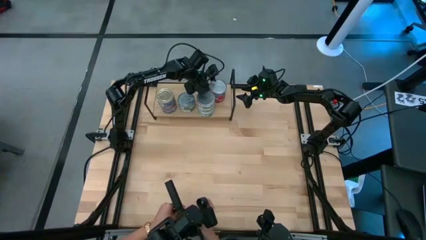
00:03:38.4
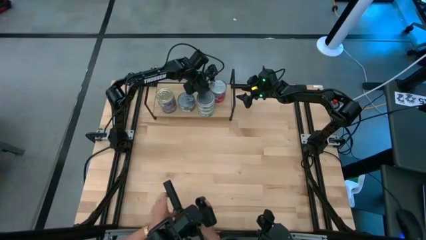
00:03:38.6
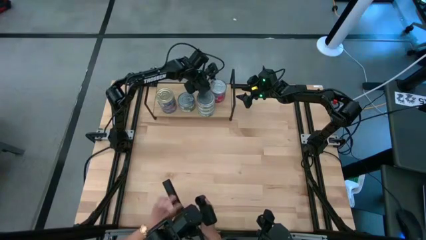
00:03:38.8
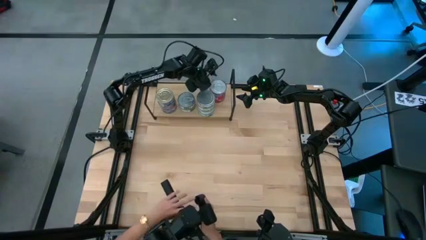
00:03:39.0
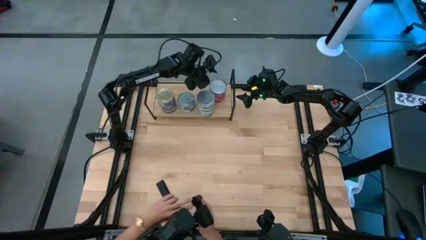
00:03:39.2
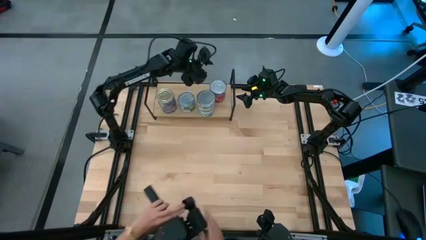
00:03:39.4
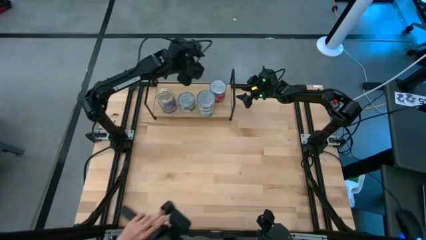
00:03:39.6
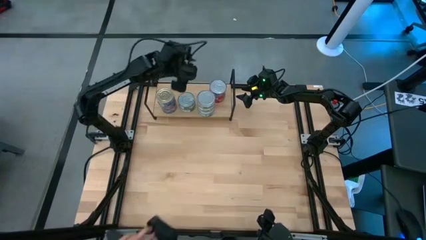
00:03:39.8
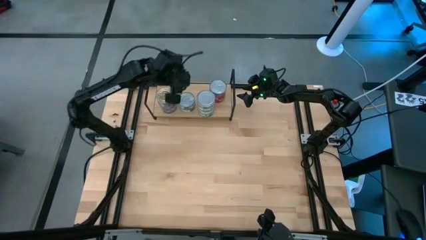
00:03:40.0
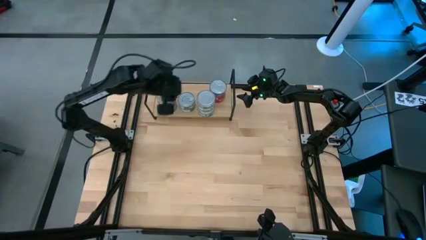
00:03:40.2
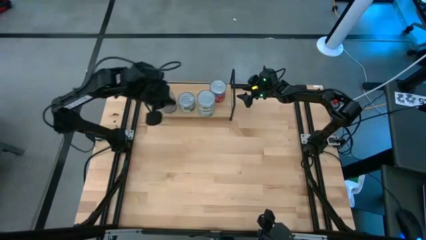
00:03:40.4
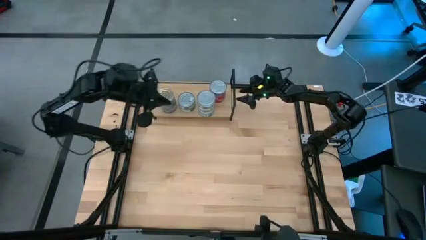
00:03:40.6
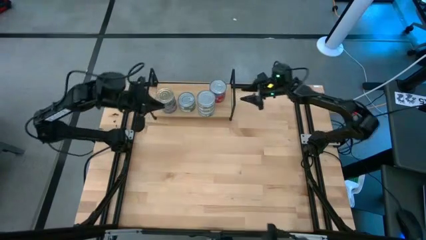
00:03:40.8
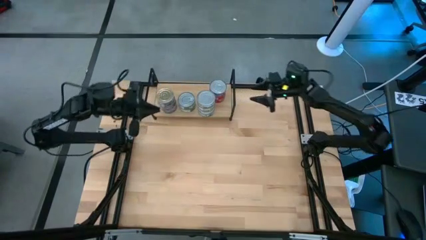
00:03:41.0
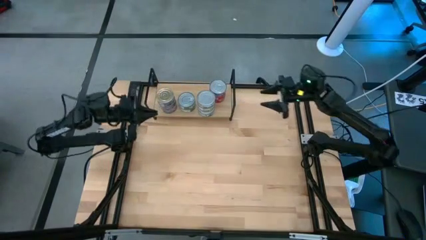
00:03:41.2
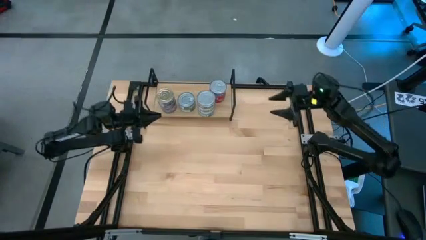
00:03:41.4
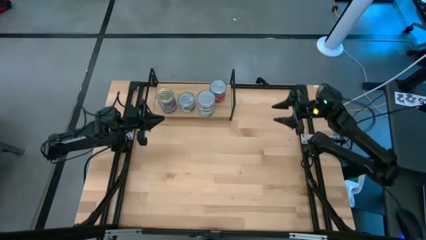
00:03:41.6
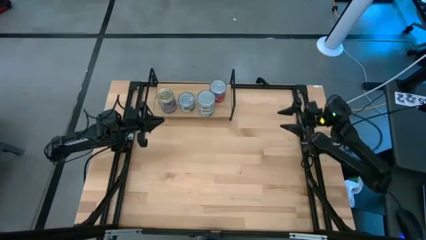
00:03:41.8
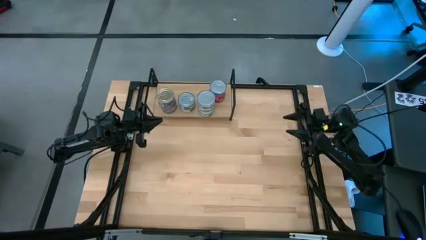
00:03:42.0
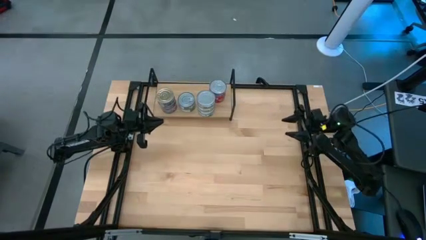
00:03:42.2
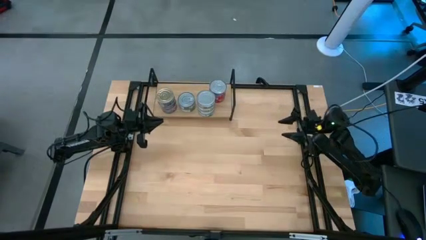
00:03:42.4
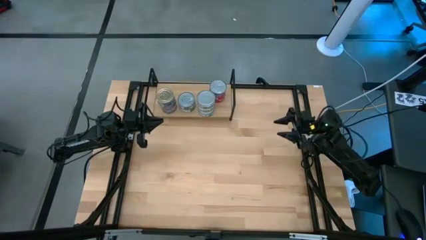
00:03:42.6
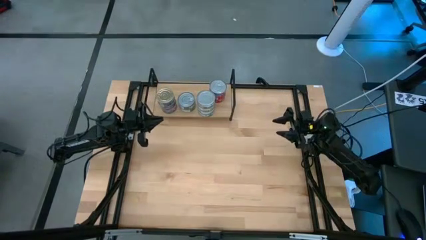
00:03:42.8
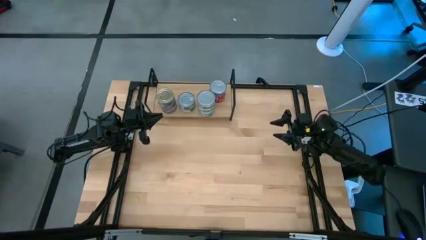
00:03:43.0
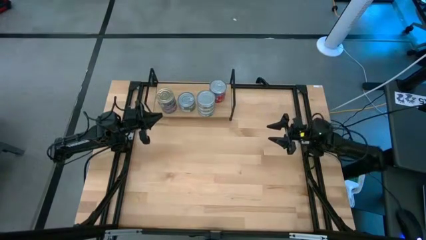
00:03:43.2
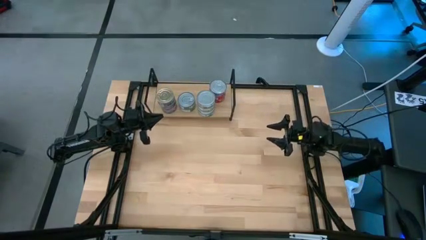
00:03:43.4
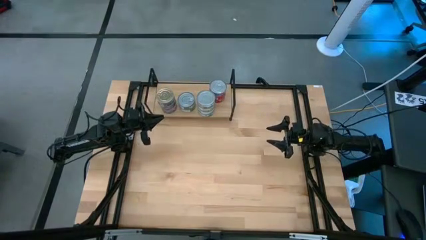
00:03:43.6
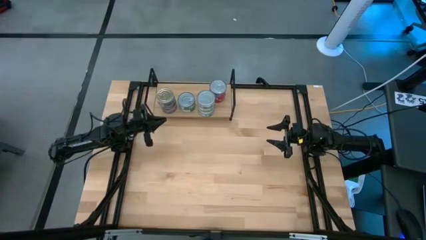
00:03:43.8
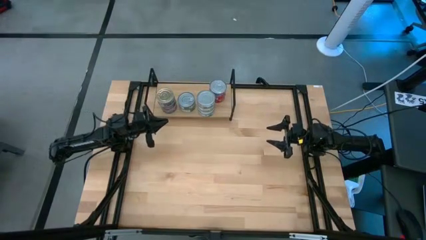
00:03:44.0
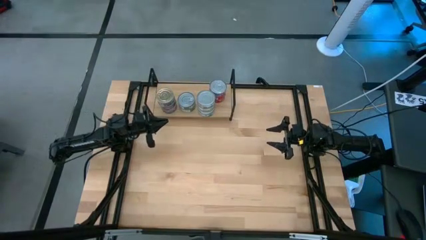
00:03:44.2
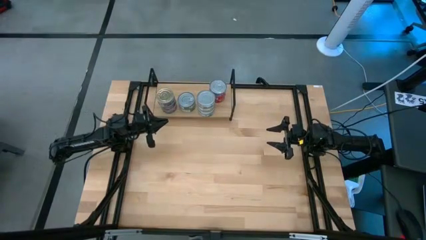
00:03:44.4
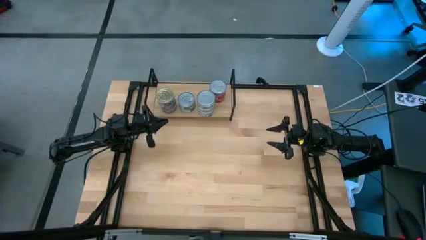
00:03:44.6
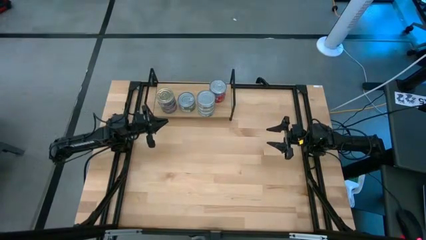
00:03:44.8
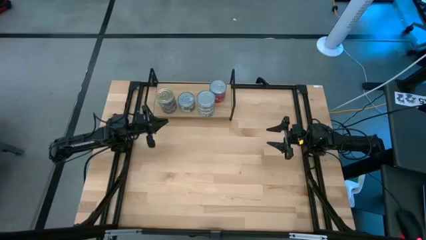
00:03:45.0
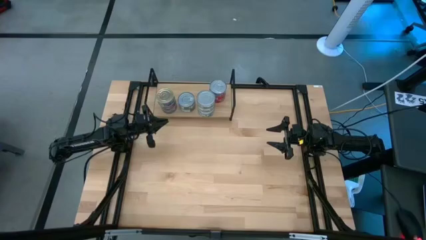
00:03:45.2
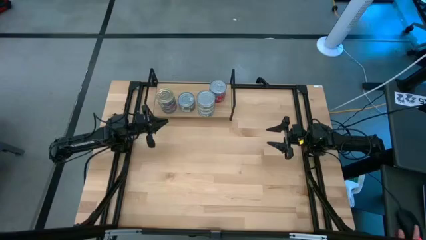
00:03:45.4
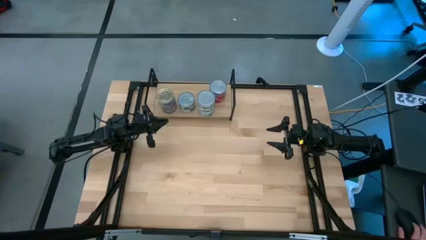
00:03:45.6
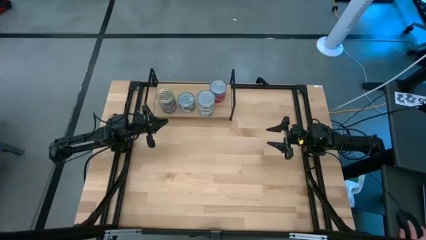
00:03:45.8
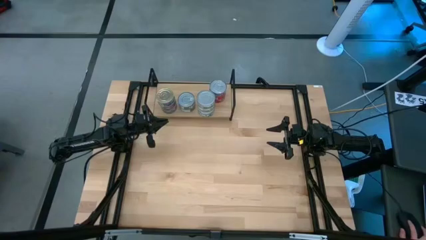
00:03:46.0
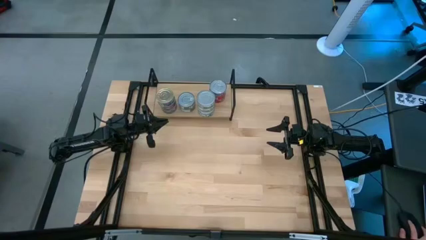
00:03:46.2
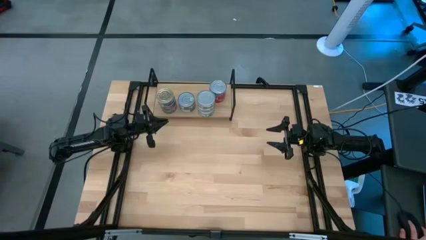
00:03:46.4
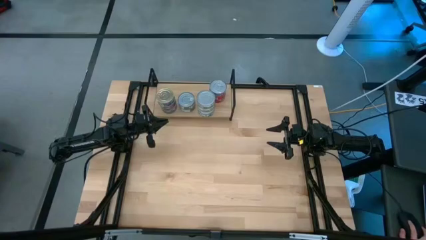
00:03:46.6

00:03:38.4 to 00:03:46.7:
Task: Stack canned seafood by type on shelf
Return to Home Position

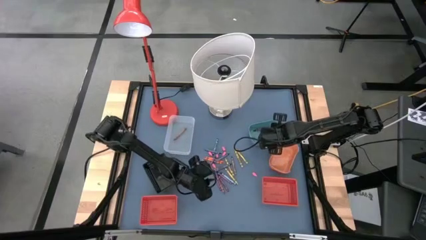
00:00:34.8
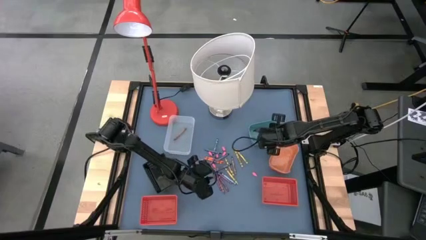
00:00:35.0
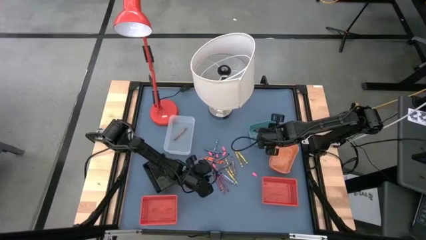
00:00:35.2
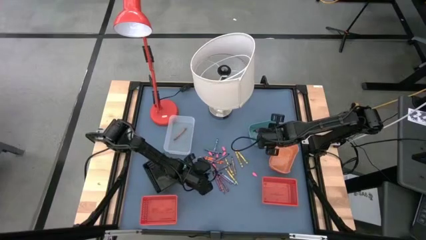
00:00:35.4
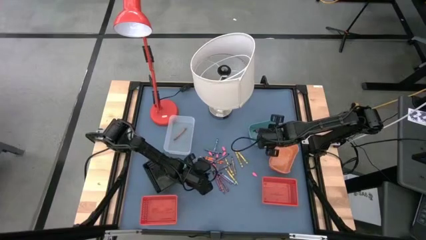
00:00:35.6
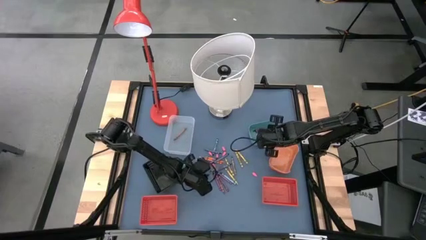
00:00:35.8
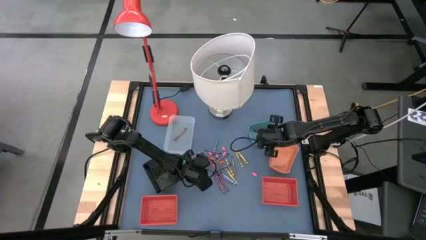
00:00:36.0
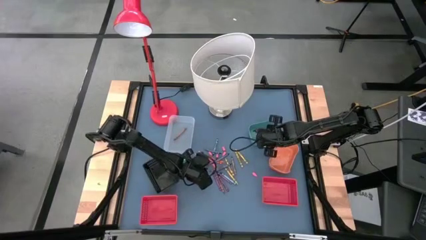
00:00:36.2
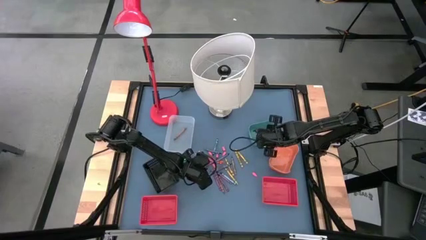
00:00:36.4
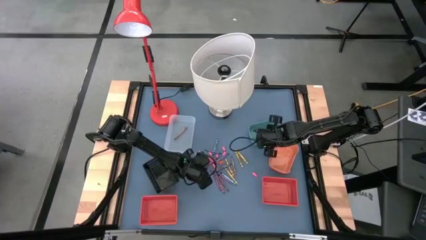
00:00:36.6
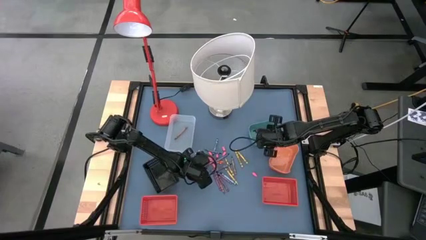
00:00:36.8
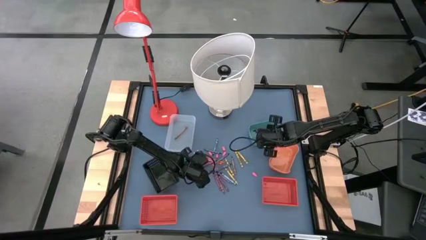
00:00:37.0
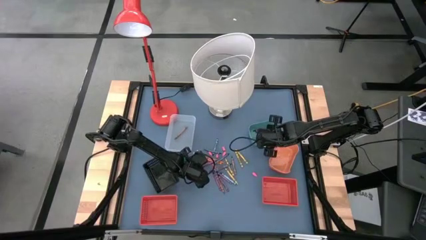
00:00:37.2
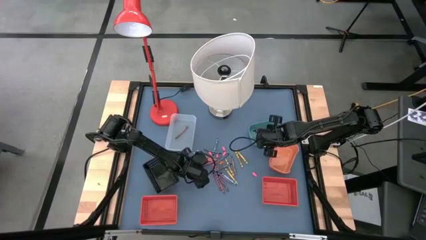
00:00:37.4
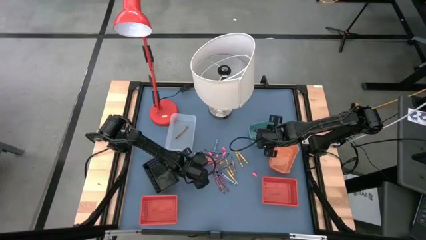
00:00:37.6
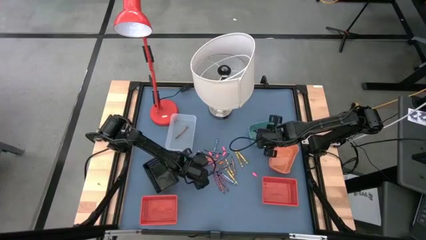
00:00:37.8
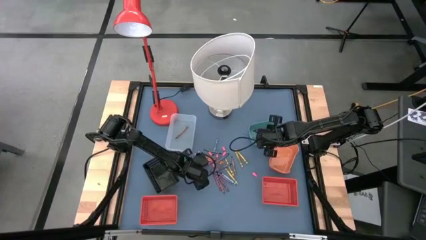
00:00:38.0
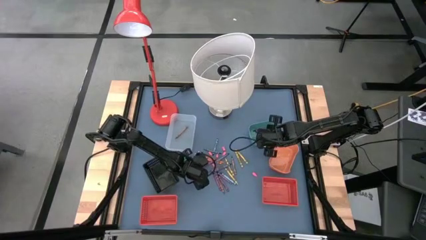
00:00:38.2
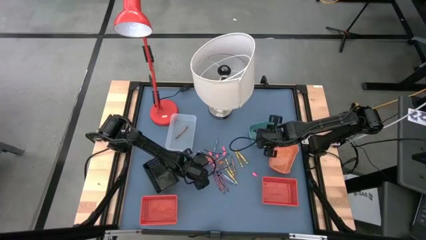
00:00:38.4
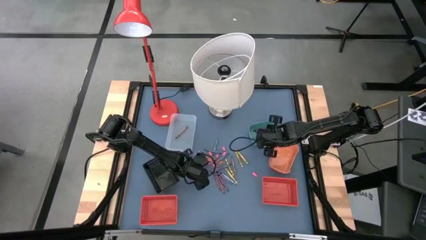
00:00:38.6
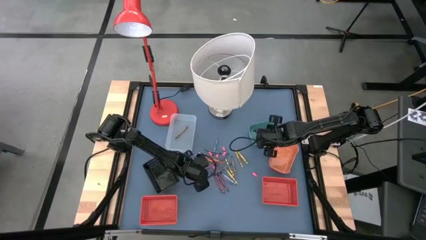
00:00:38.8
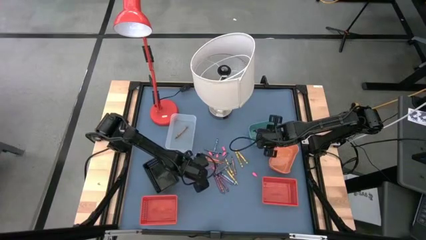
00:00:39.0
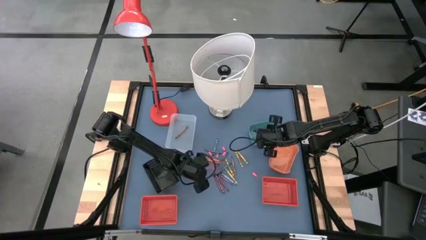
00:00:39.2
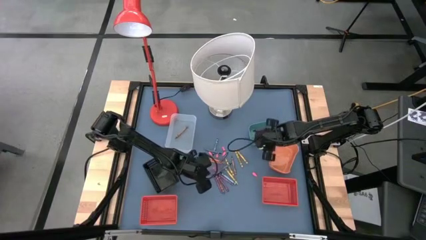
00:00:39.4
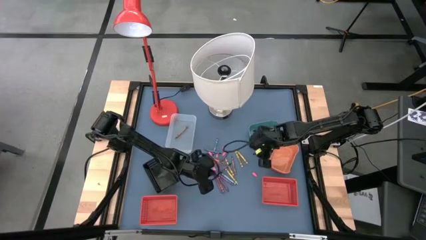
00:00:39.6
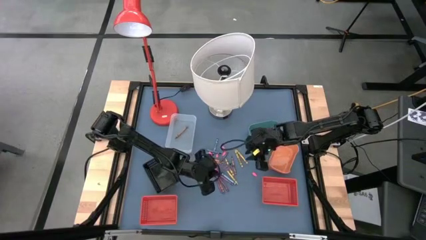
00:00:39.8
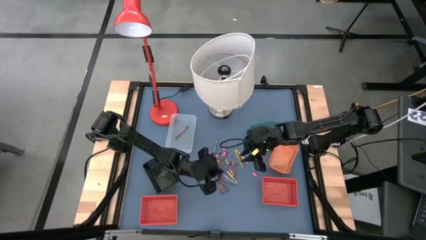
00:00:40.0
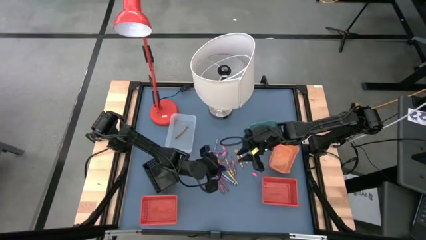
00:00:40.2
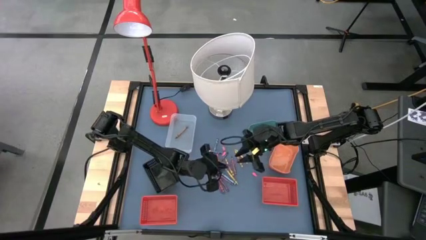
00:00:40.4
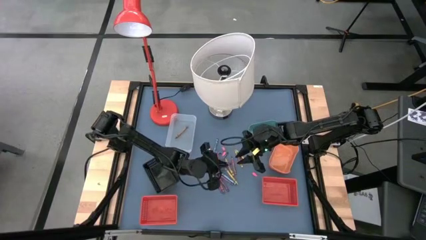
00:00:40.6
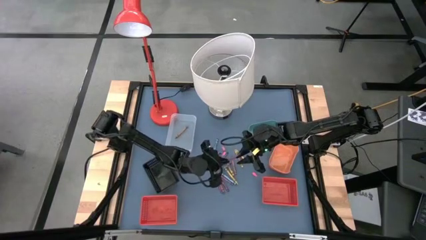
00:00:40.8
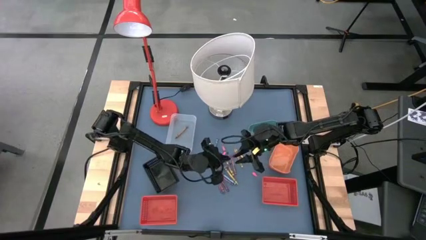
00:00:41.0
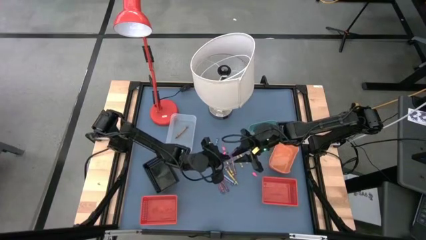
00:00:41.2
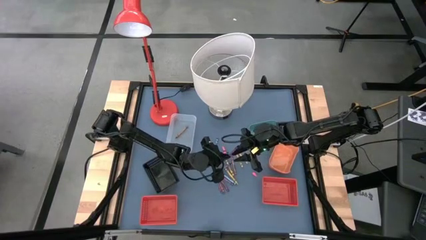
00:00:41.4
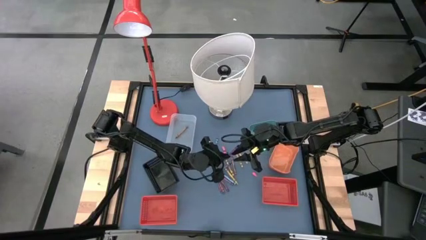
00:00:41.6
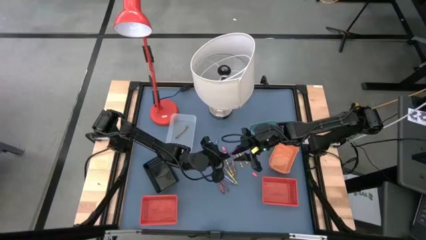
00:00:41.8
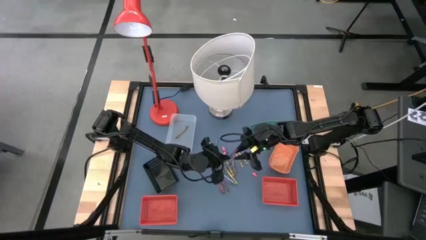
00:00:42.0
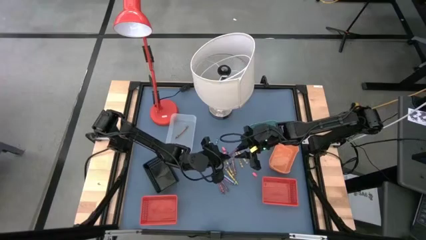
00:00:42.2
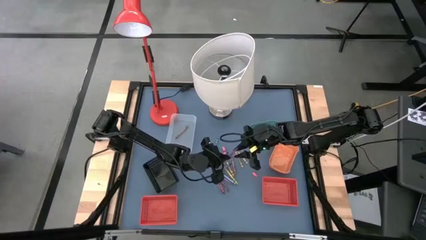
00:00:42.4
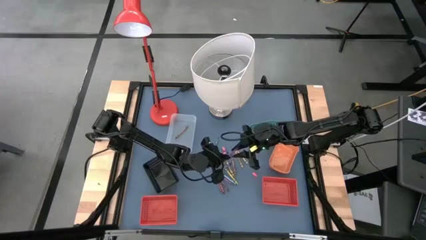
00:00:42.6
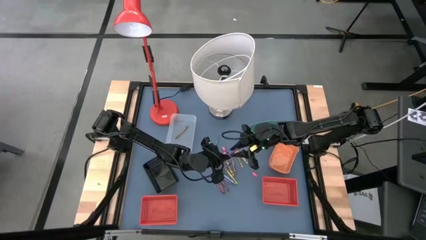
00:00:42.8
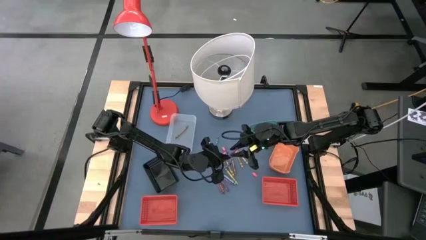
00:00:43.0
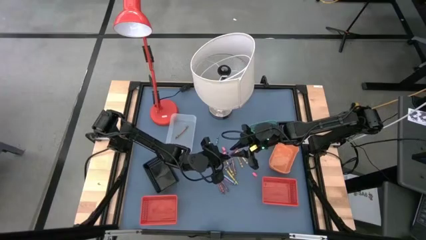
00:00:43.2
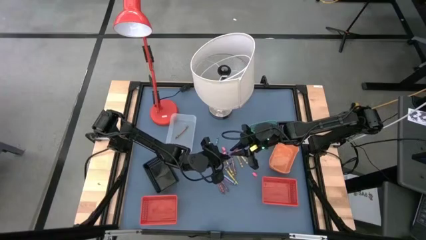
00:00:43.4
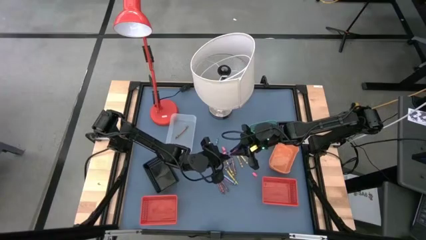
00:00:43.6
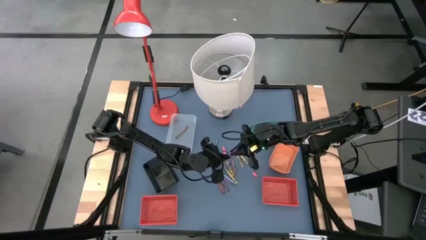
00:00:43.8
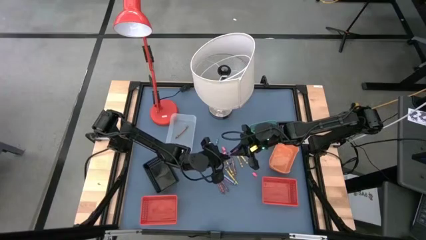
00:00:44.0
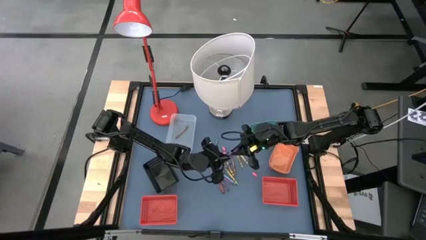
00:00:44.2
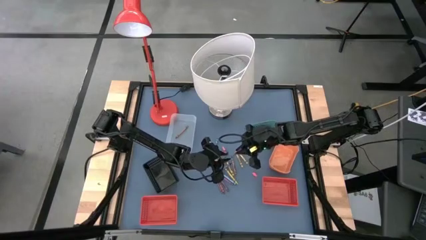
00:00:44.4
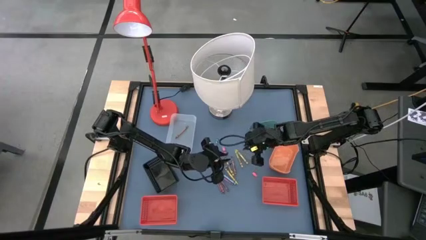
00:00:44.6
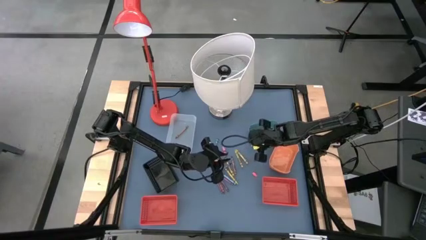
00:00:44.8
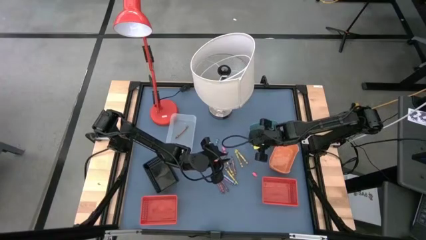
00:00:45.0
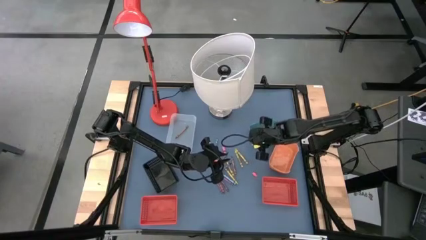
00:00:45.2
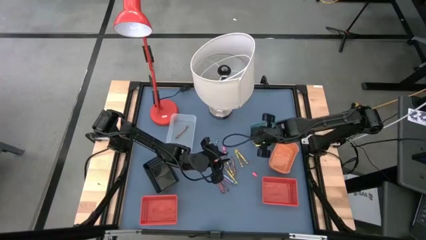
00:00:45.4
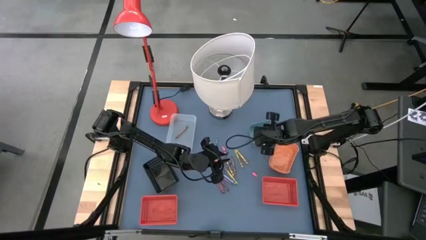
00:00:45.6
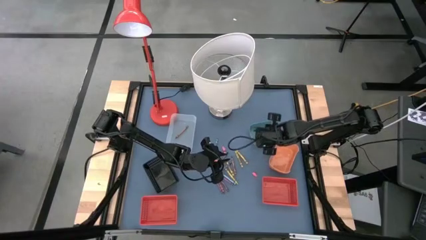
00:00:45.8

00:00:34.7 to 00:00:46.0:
Task: Sort crayons
Put the violet crayon into the green bin
